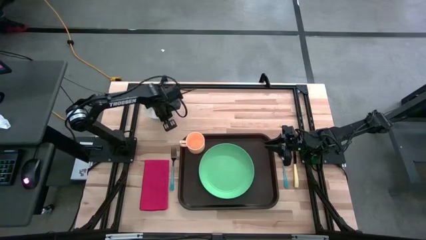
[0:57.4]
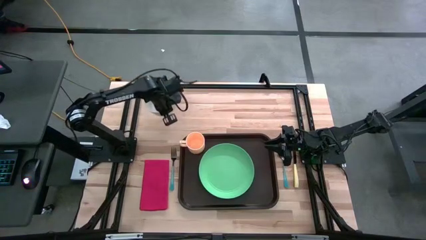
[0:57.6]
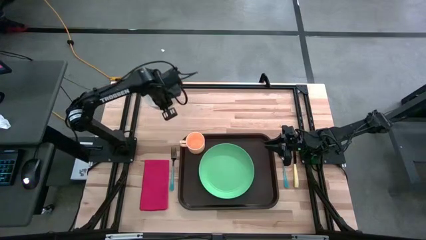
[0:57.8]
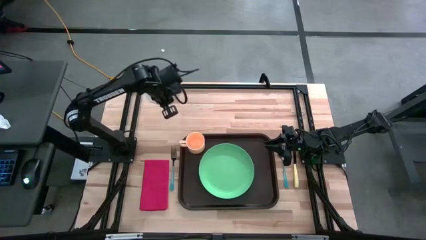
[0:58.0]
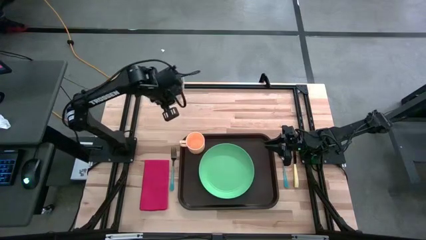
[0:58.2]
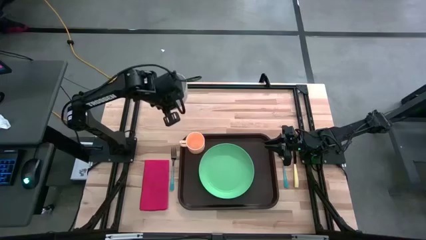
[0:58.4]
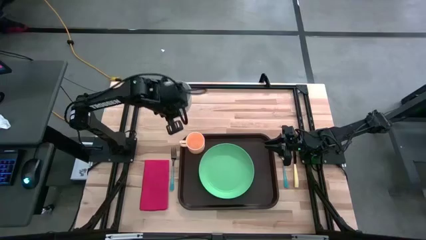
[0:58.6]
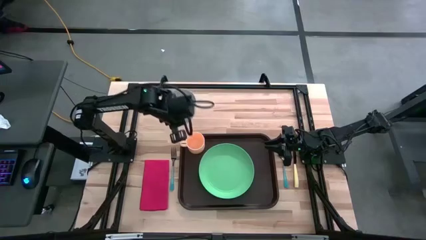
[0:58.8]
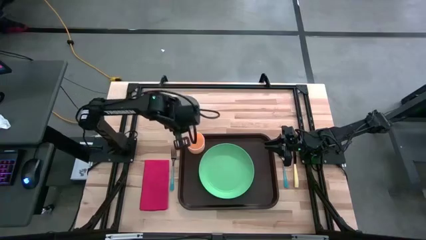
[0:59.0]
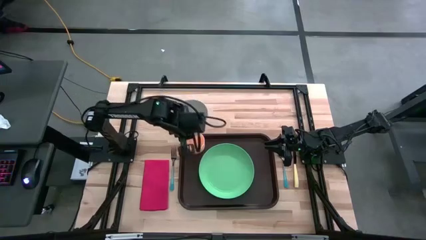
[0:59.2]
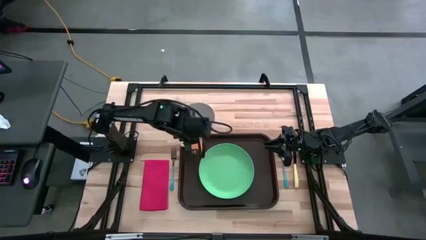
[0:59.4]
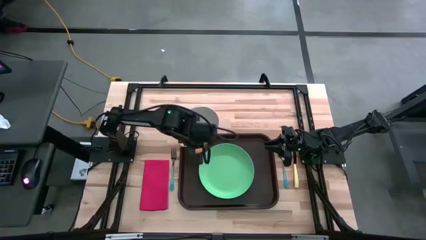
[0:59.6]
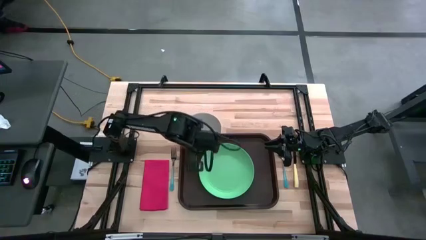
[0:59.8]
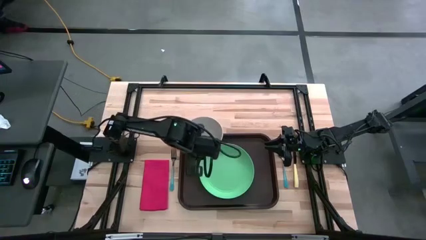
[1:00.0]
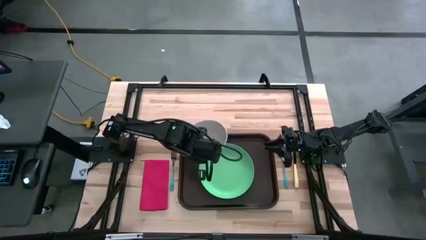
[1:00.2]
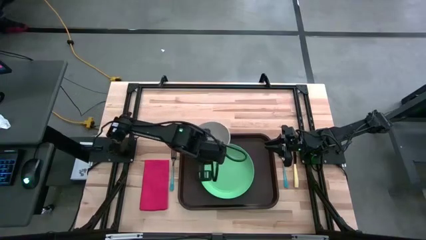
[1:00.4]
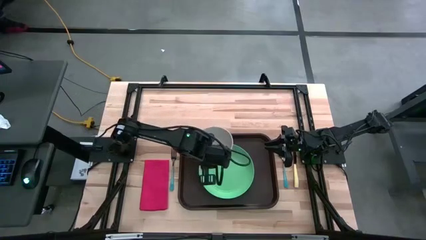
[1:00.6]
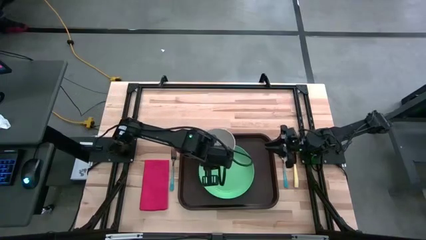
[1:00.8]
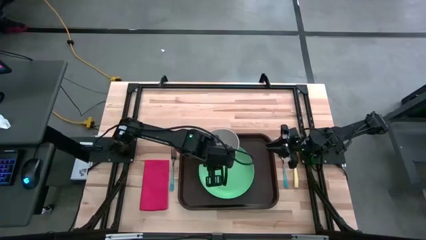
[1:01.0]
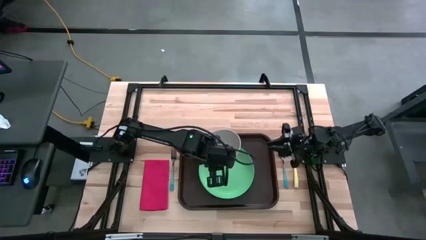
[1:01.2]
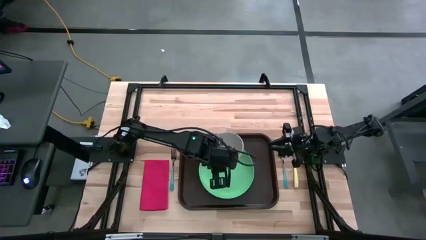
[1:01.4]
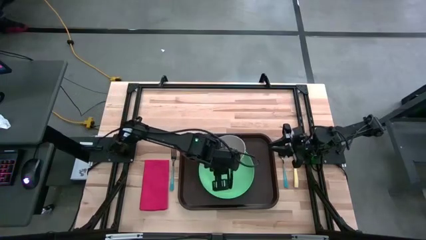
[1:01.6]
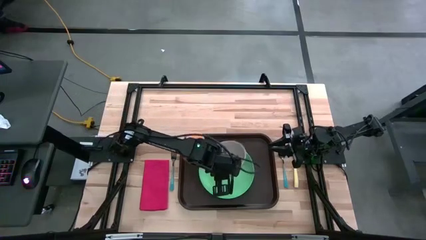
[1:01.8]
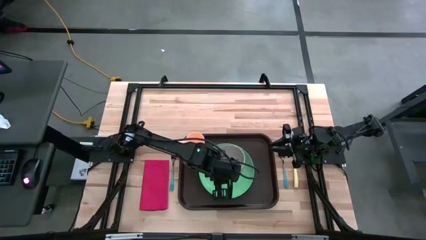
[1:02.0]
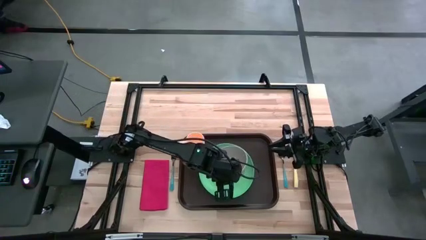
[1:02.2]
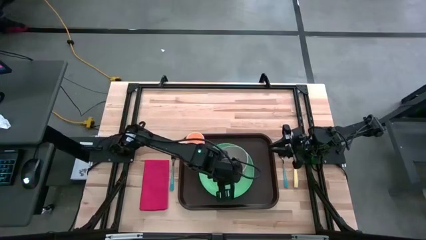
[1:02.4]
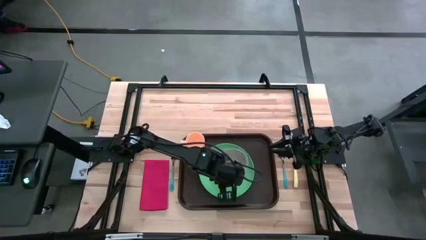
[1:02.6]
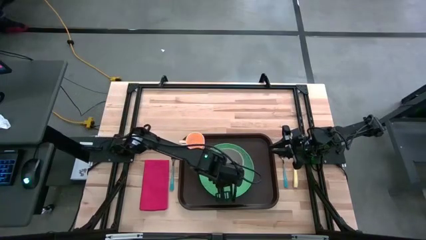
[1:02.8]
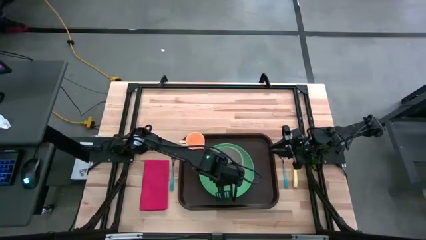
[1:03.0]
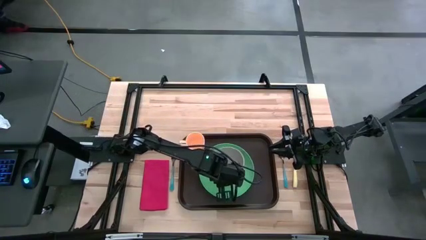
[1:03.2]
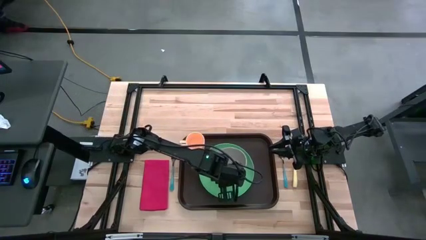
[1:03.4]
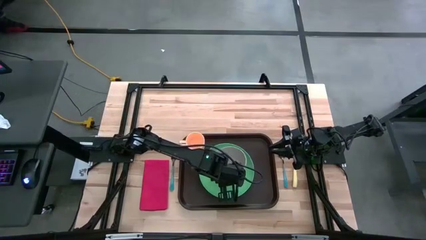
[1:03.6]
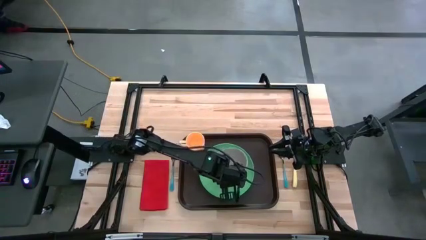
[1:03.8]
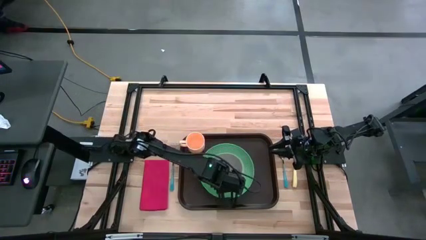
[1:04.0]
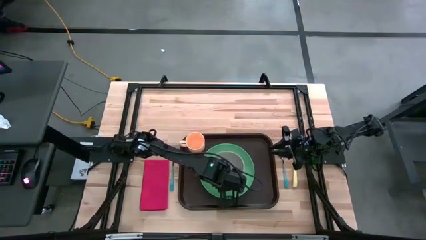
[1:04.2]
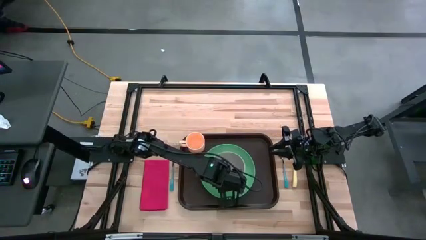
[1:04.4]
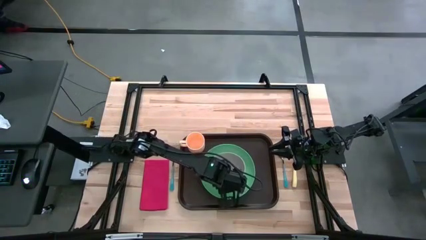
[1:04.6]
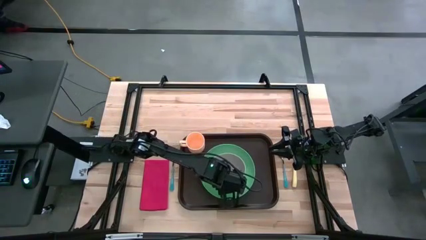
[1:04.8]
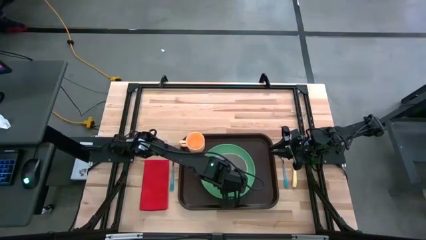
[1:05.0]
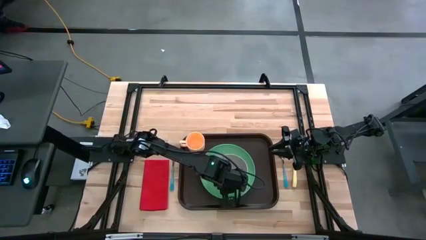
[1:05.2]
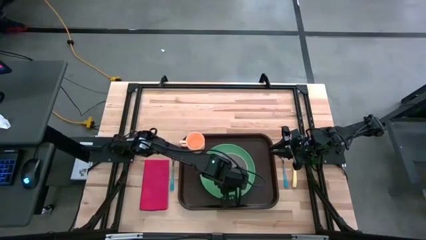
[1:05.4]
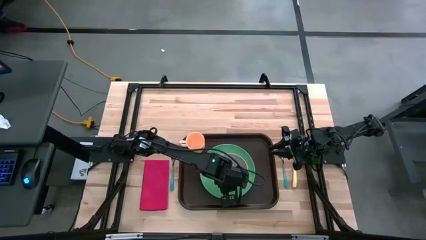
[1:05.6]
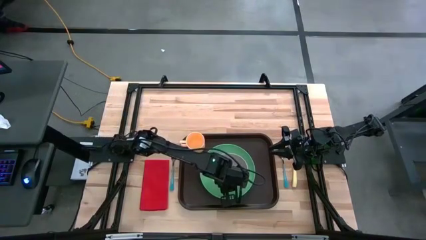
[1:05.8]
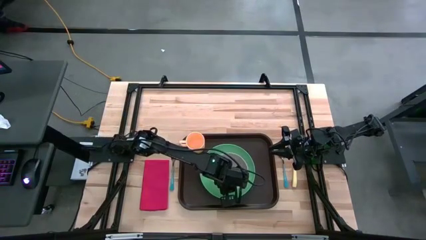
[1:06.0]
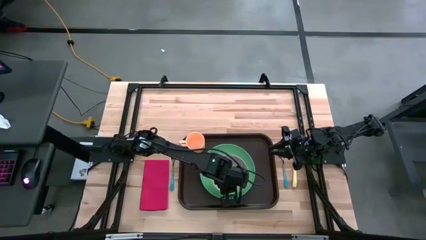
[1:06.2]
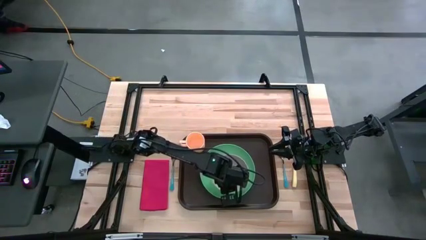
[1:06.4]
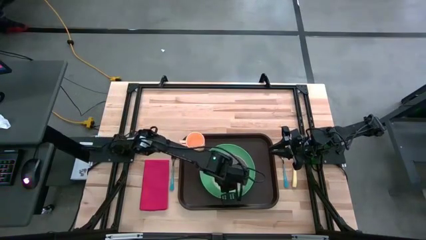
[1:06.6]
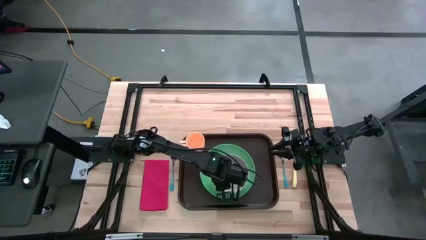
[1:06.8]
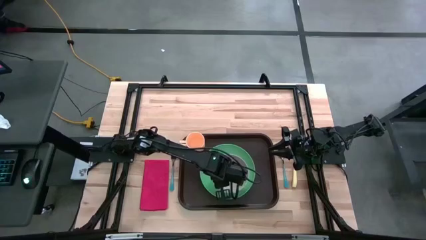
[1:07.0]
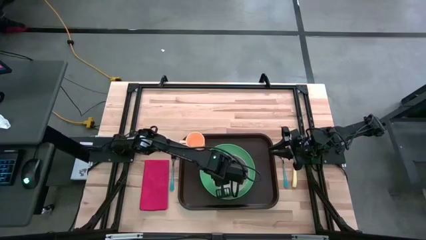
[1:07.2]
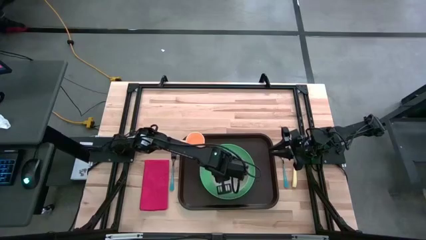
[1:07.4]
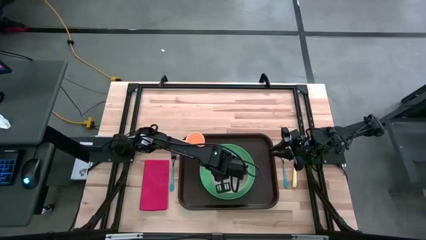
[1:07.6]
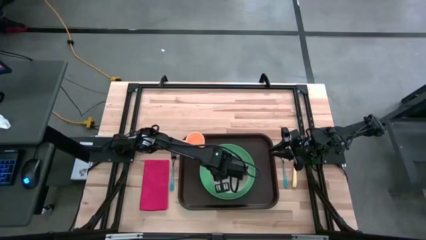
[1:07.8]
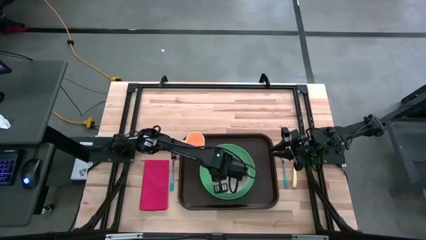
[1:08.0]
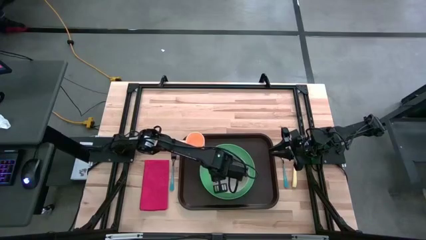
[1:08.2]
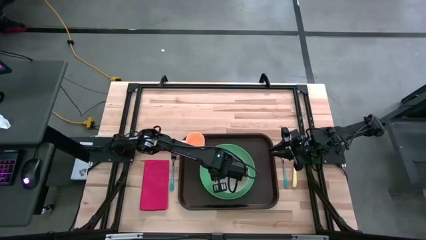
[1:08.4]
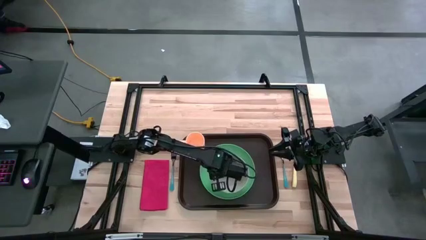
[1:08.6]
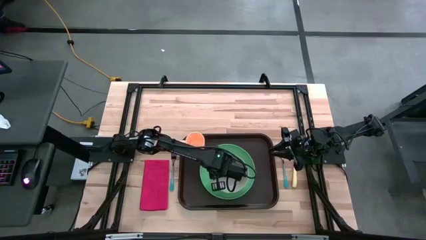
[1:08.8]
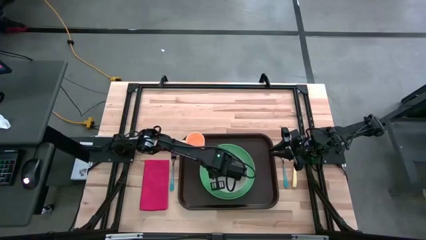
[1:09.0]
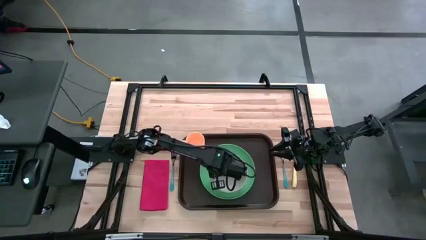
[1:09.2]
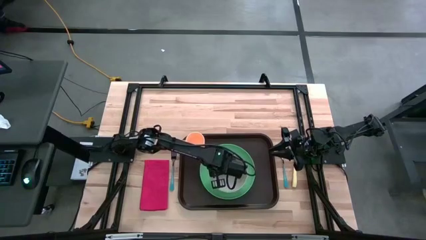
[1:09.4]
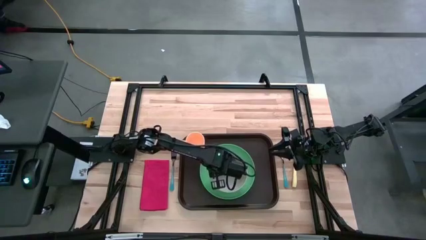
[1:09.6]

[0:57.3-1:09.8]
Task: Set up tray
Put the gray bowl on top of the green plate on the brown serving tray
